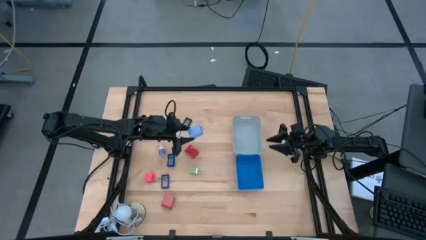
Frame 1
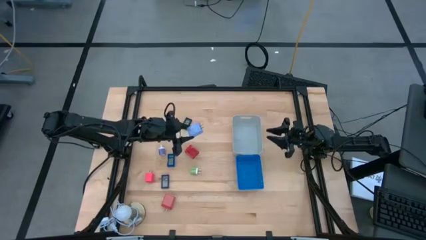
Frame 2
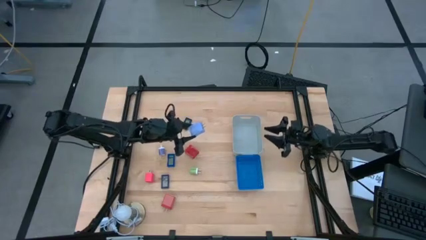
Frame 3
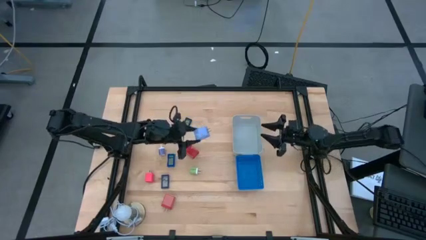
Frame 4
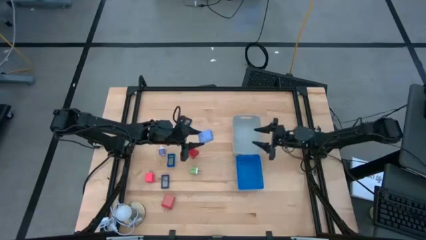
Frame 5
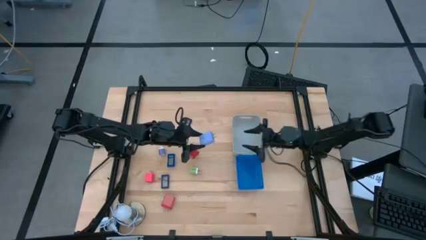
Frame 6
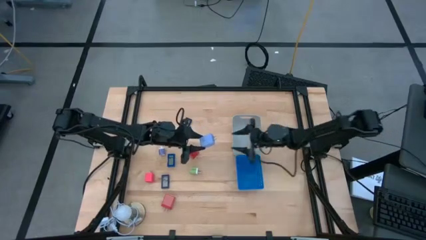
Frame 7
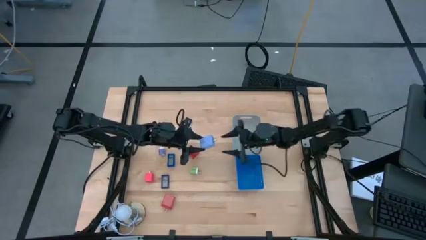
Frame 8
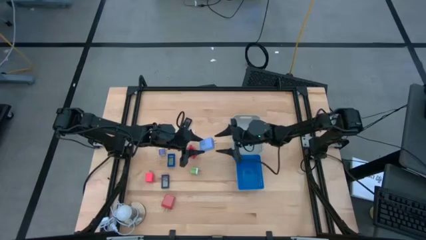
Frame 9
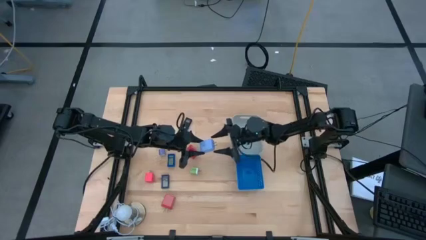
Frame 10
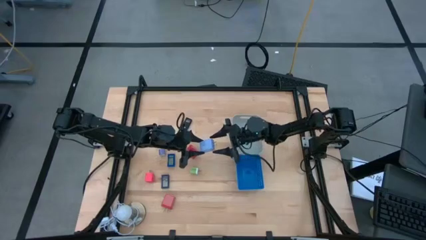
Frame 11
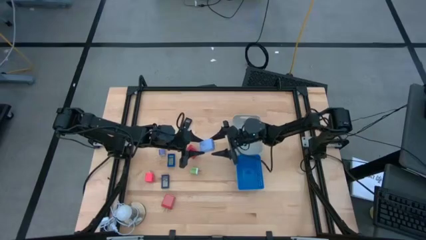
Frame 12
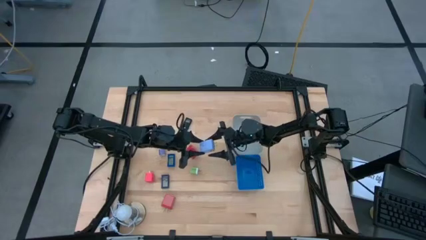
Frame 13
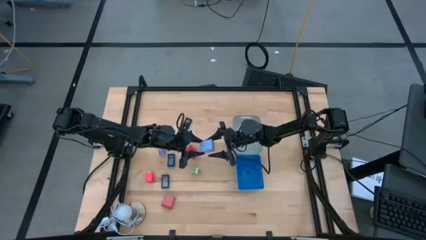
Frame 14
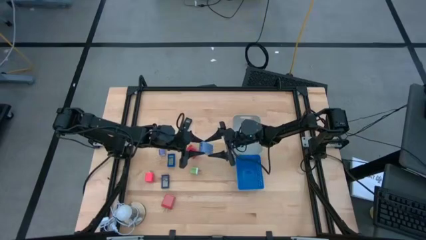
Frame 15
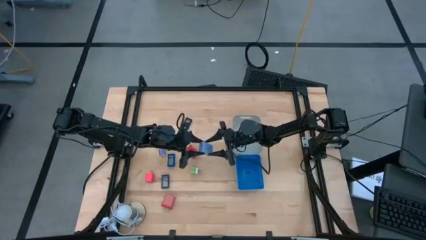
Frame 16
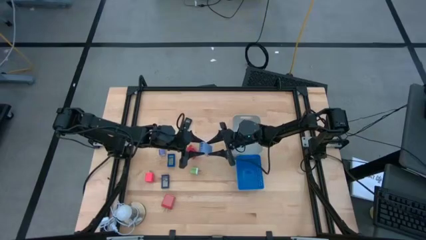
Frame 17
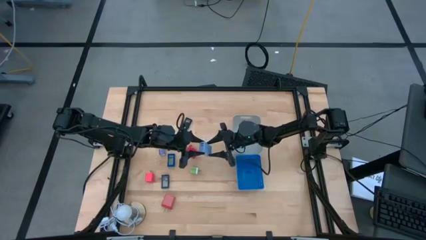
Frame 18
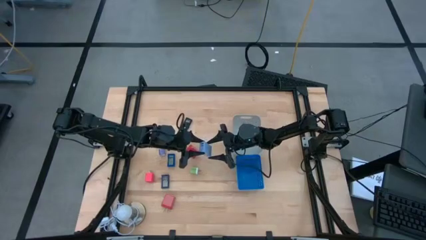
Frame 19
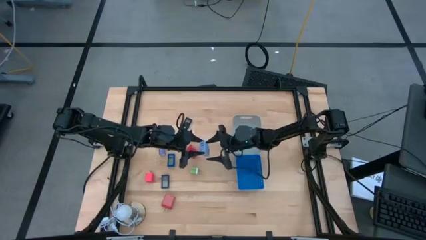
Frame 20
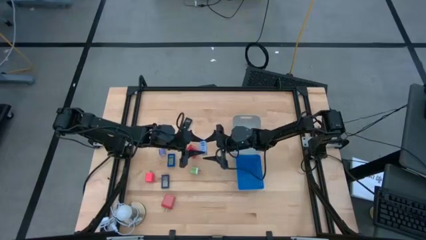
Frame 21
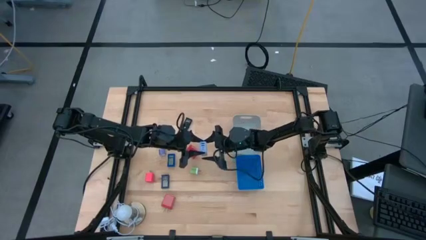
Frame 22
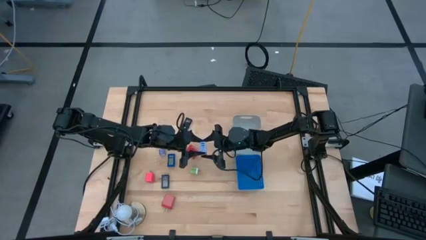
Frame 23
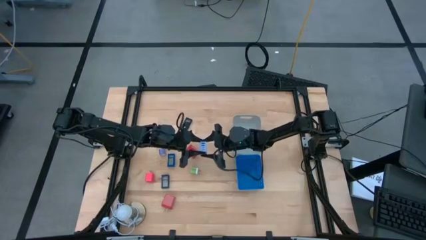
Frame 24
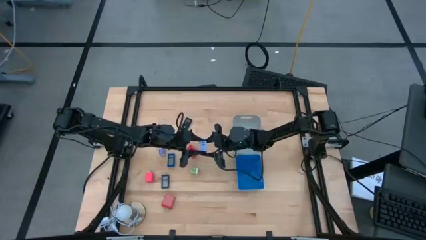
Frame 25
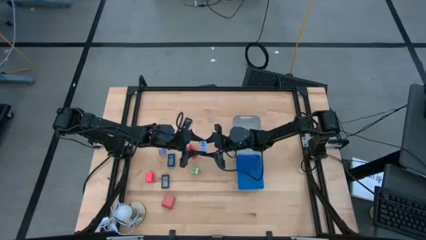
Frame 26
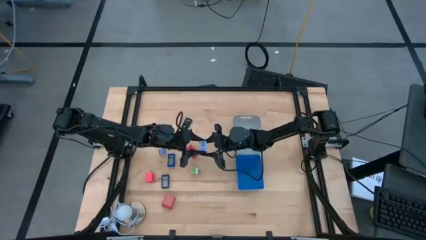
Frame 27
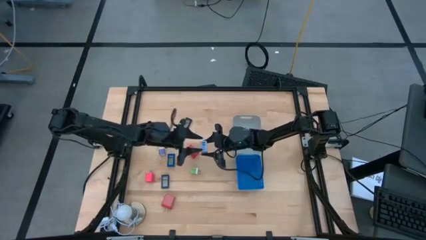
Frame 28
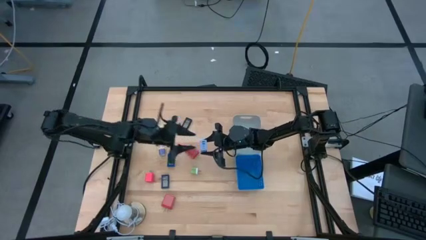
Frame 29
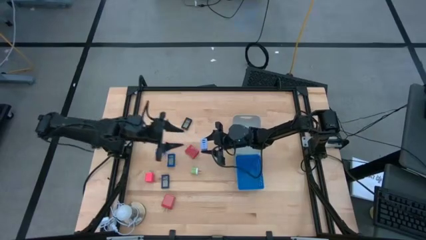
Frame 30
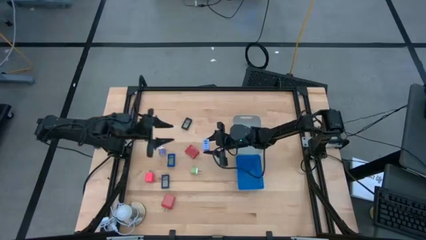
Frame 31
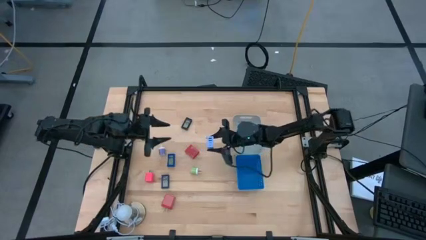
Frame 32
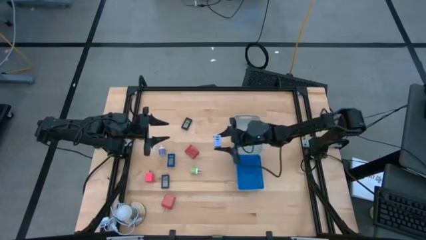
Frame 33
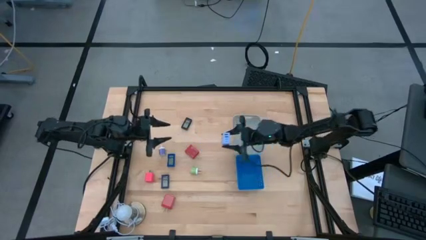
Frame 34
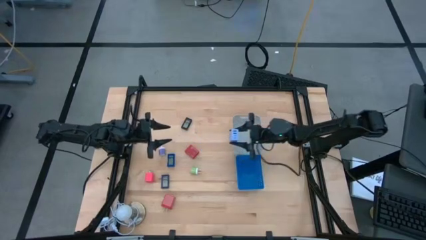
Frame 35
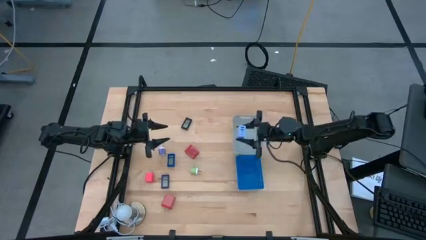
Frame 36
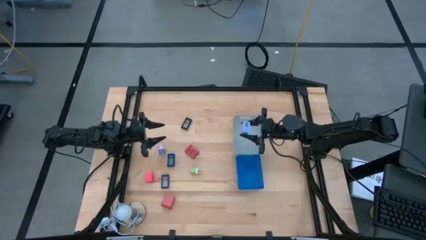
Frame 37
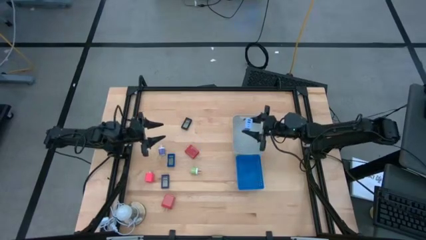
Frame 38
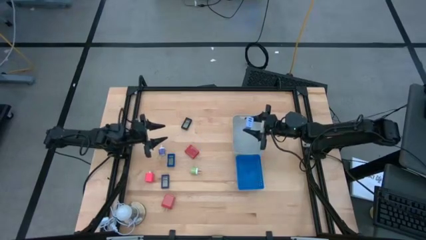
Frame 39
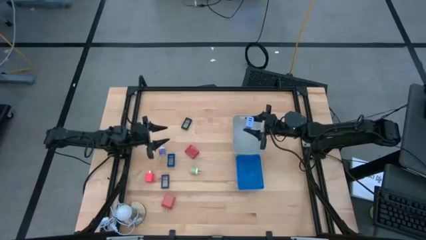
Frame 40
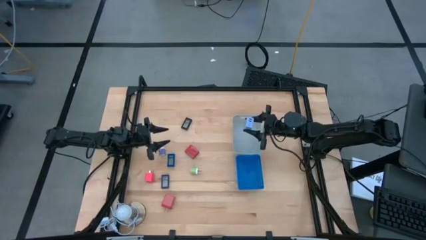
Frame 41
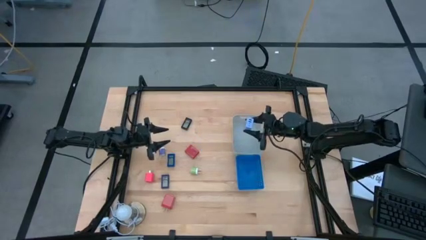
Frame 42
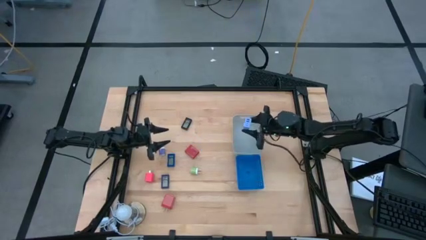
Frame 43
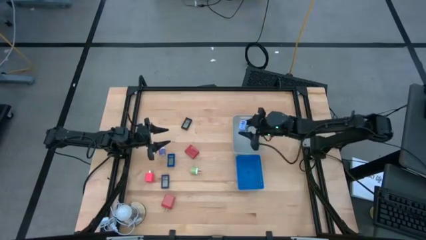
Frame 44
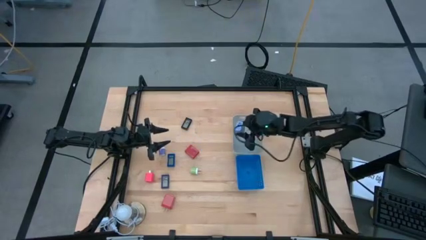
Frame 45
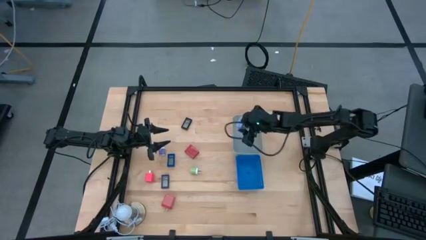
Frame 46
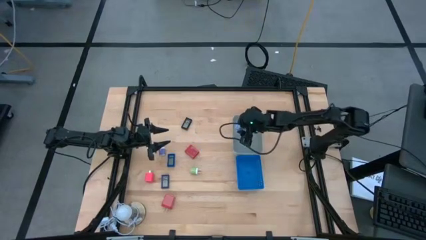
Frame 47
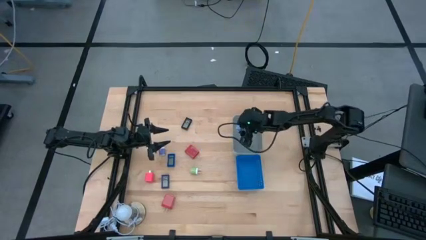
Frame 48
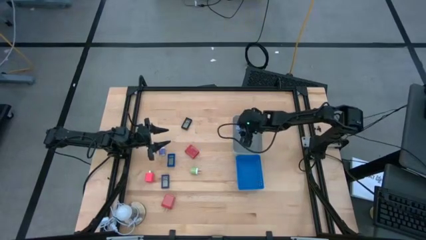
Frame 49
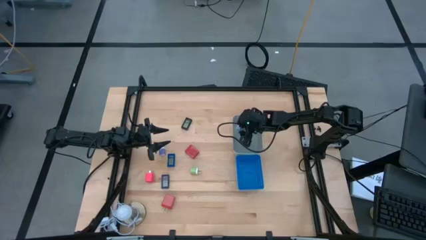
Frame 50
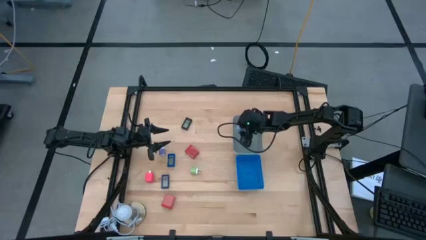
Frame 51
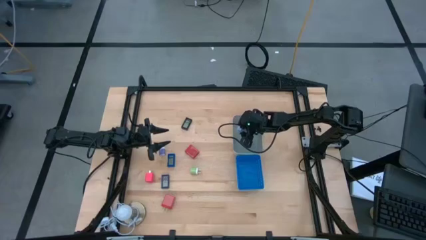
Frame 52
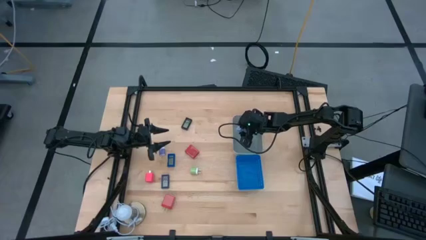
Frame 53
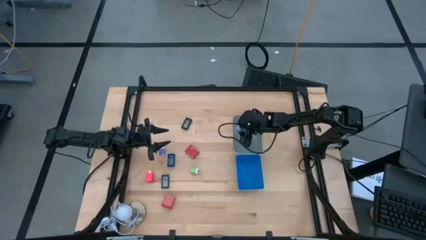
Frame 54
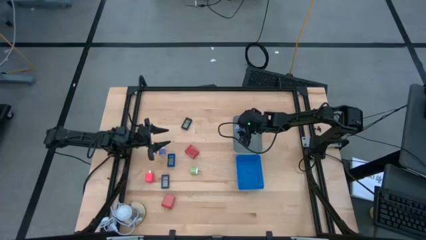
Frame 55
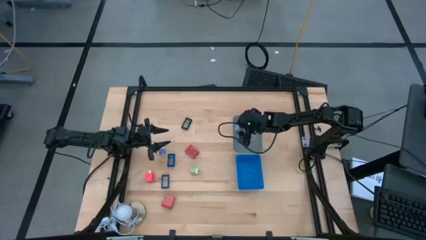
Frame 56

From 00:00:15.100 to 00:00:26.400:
Task: Pick & Place Office items
Put the light blue charger adapter into the gray bin

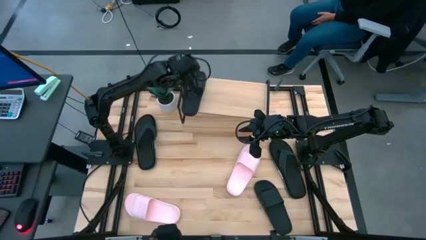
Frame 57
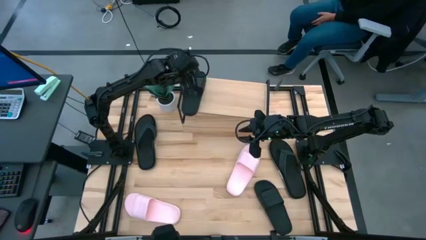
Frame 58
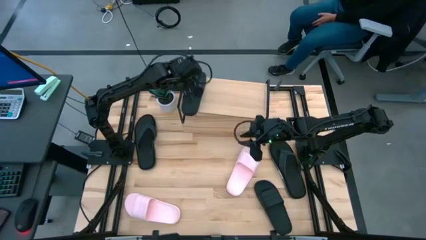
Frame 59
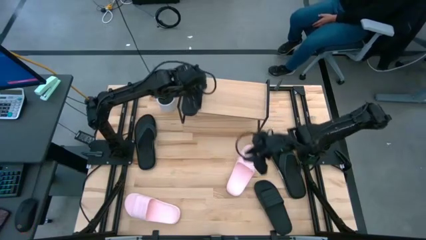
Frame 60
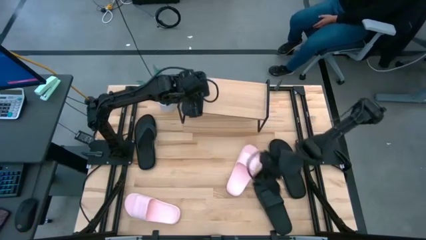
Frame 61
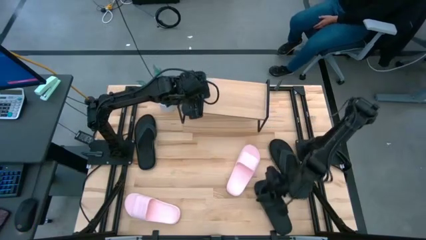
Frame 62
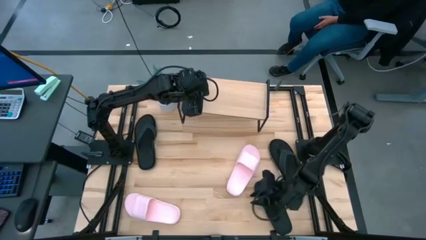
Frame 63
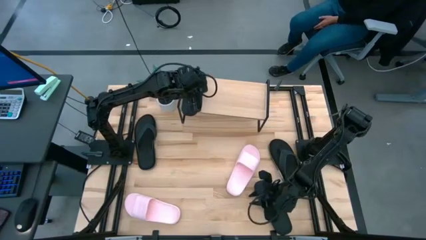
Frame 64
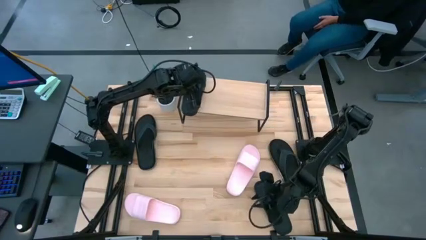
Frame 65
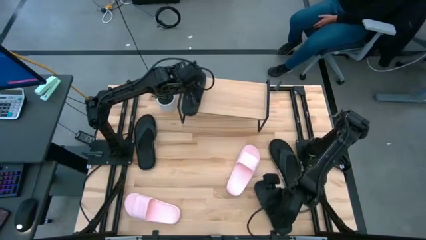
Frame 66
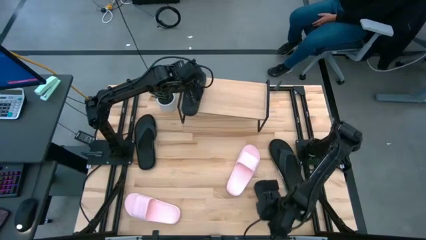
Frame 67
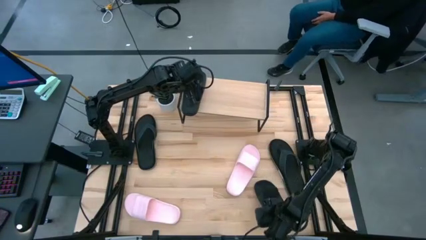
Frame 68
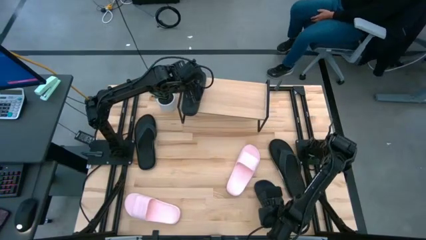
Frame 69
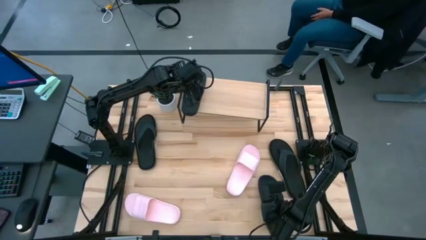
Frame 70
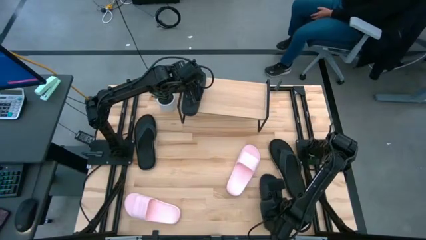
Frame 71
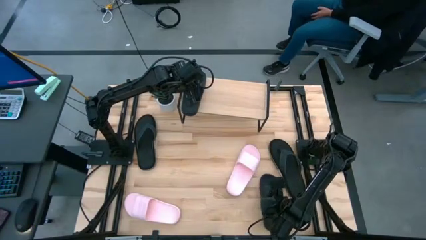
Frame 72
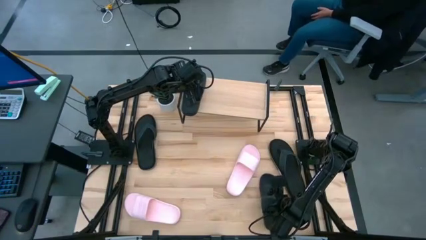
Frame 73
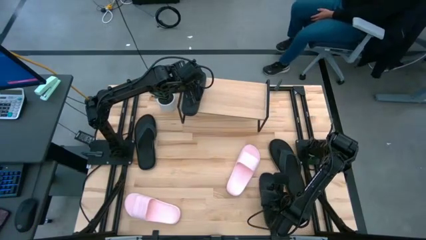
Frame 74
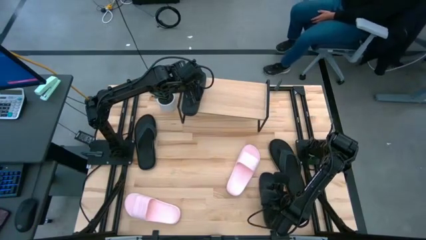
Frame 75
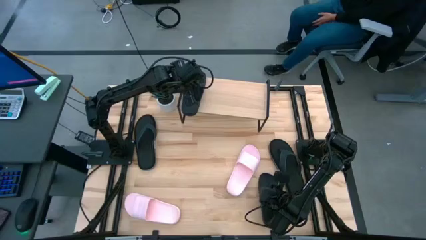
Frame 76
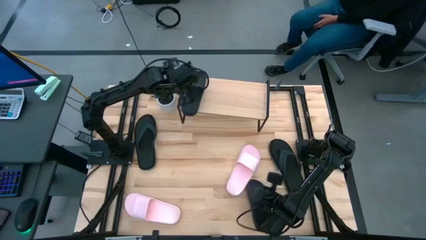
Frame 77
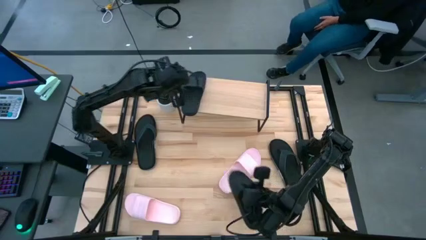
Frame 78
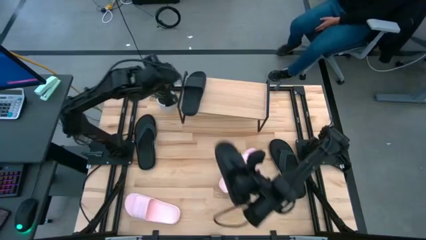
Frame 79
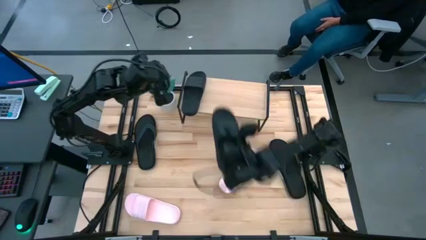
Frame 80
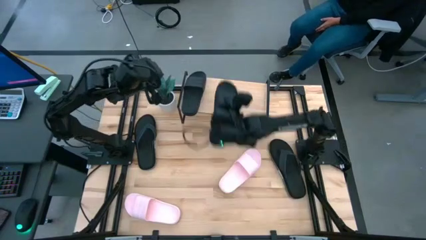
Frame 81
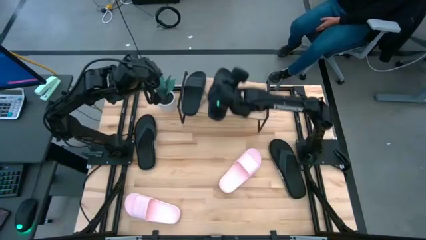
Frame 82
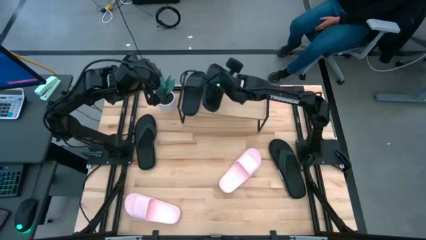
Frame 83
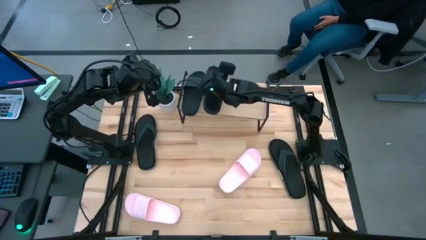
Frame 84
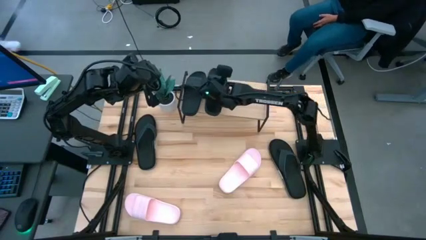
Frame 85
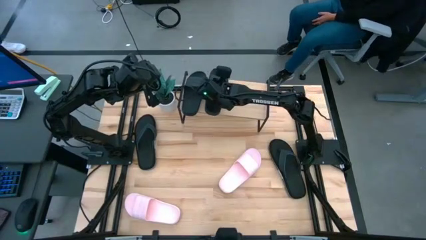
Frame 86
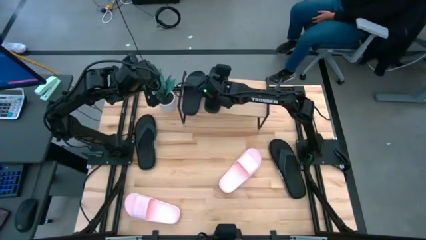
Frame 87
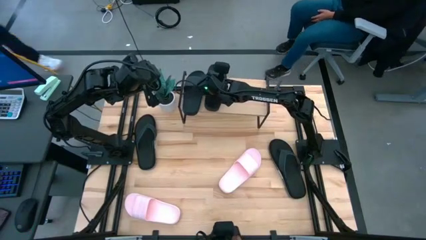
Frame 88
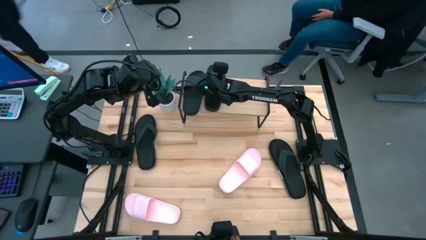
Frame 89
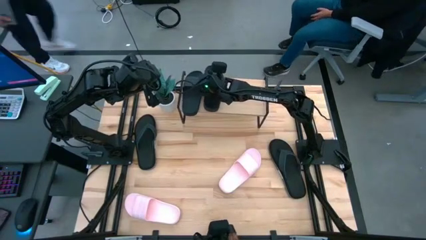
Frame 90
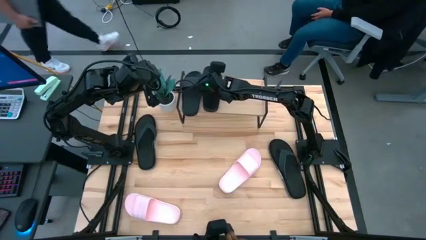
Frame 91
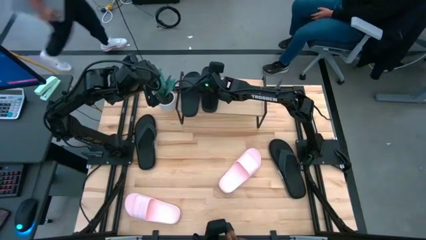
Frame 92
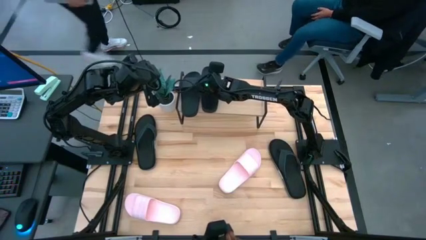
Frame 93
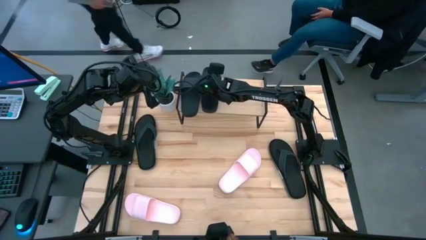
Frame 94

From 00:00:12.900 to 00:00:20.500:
Task: Pick and place slides into the shelf
Put the black slide on the shelf
